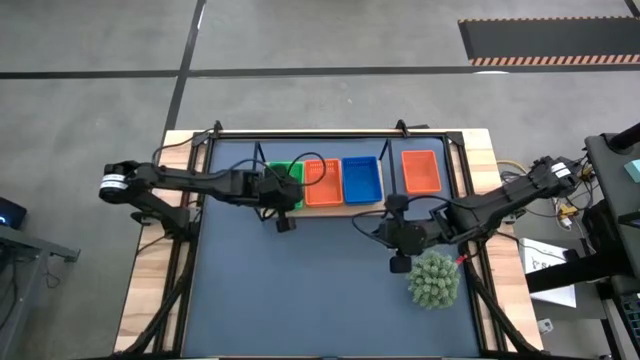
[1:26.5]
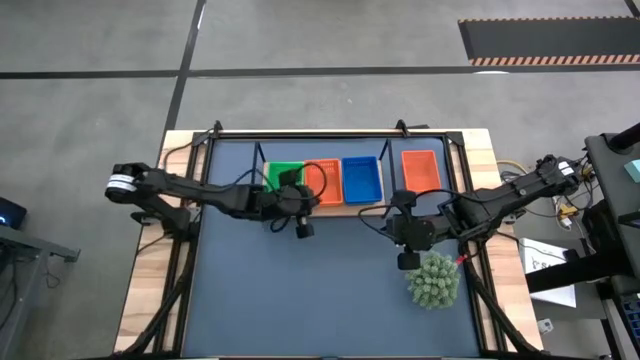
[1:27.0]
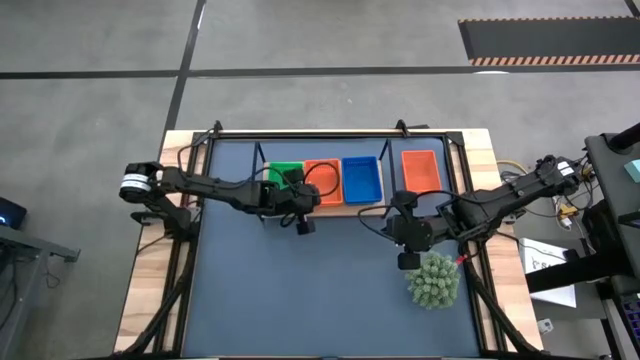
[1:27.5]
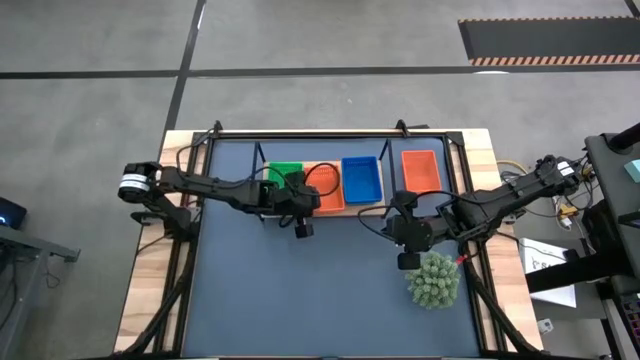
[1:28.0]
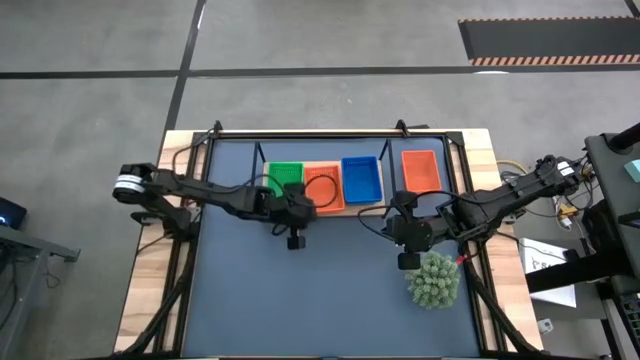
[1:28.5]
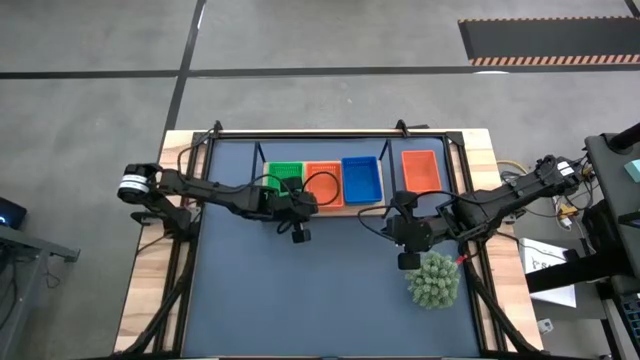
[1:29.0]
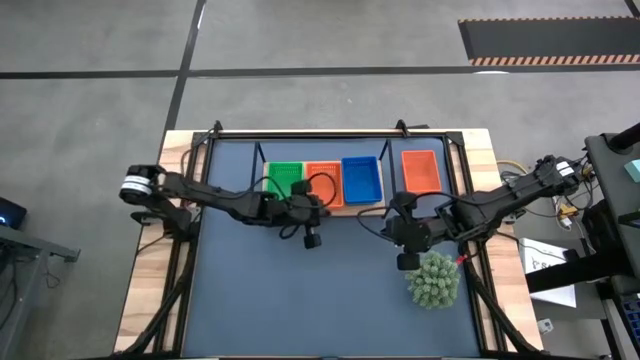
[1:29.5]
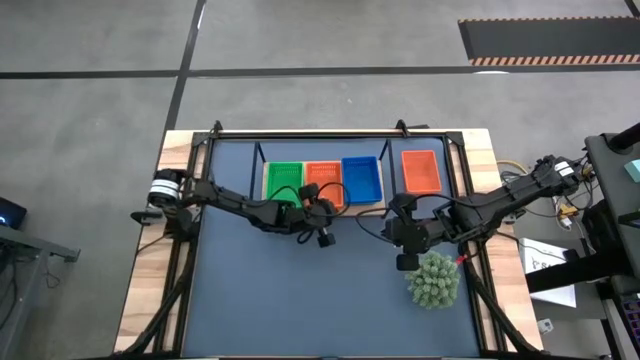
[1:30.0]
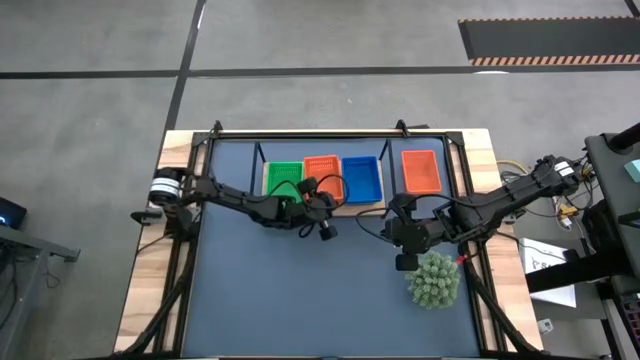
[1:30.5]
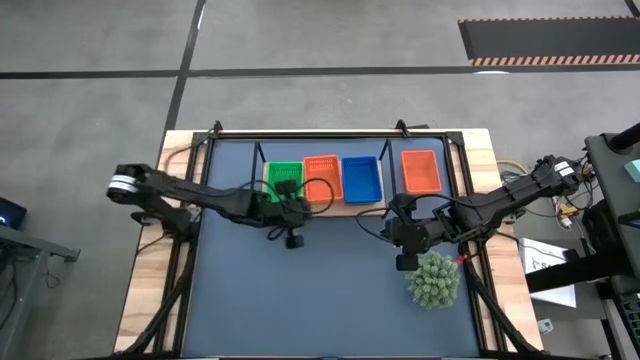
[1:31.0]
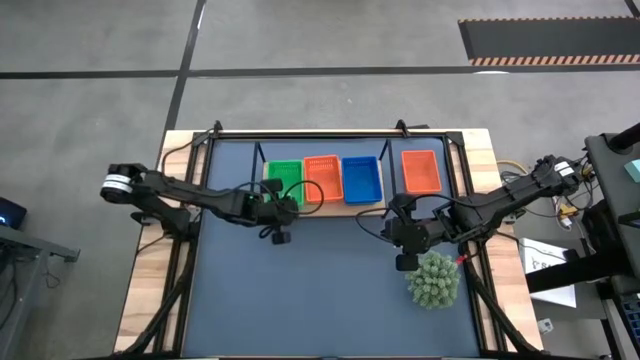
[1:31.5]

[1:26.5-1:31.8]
Task: Stack baskets on shelf by color
Adjust the basket on the shelf

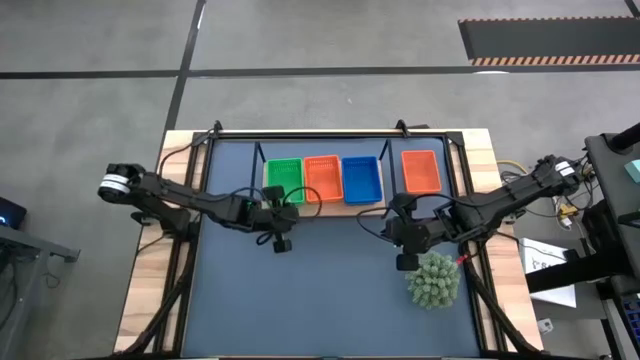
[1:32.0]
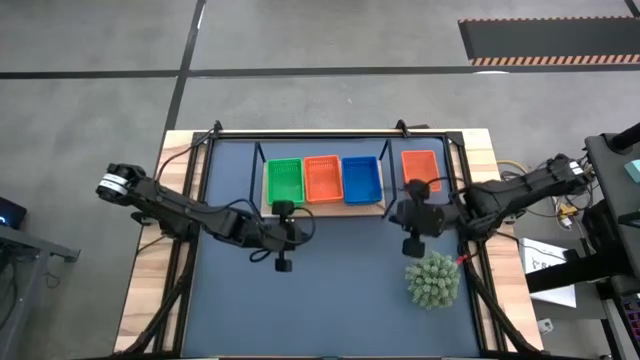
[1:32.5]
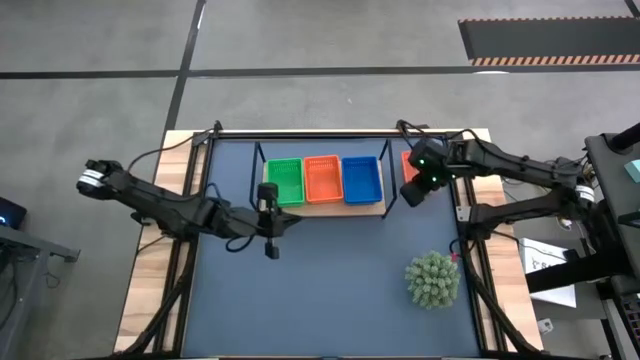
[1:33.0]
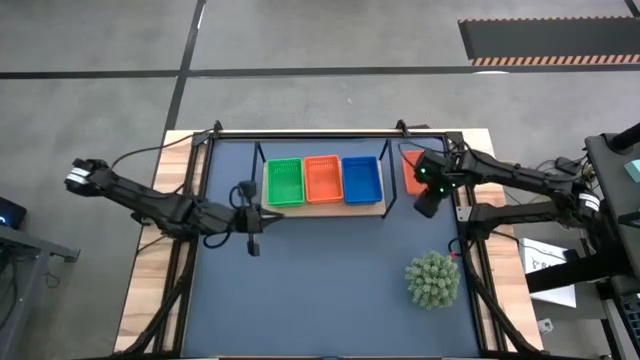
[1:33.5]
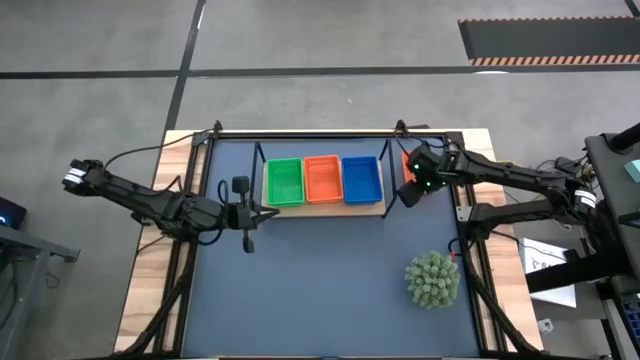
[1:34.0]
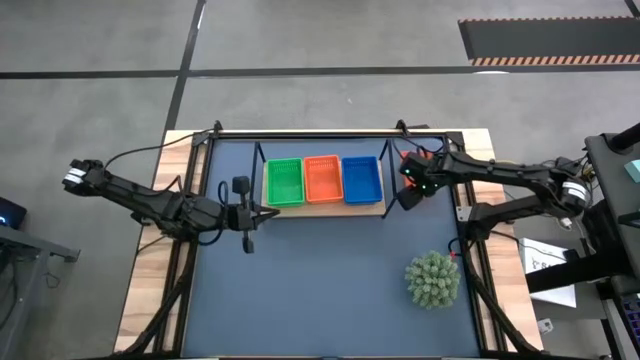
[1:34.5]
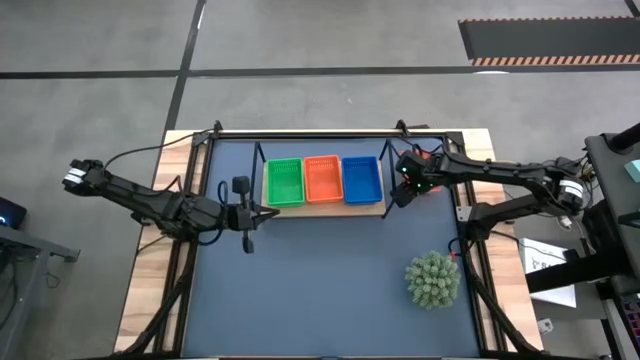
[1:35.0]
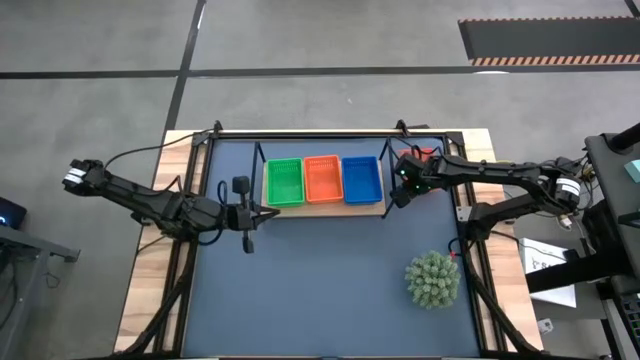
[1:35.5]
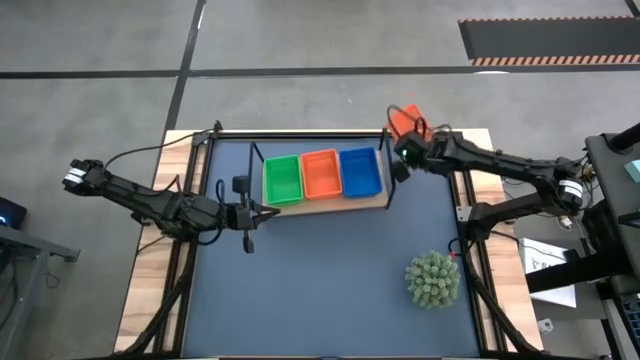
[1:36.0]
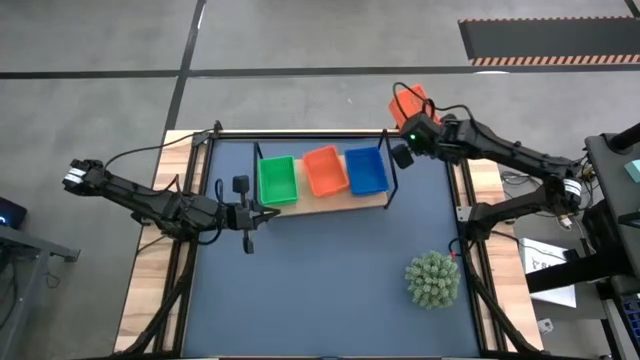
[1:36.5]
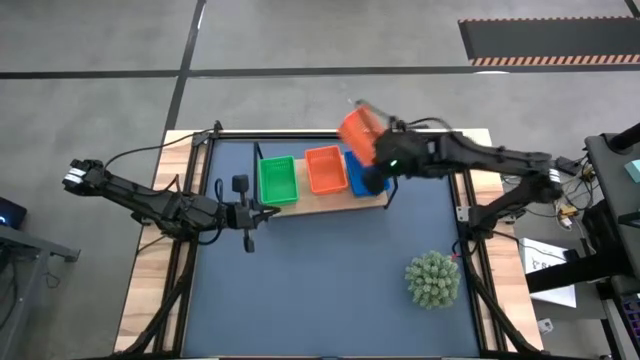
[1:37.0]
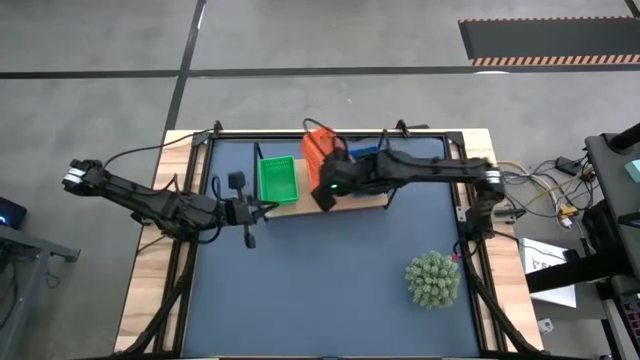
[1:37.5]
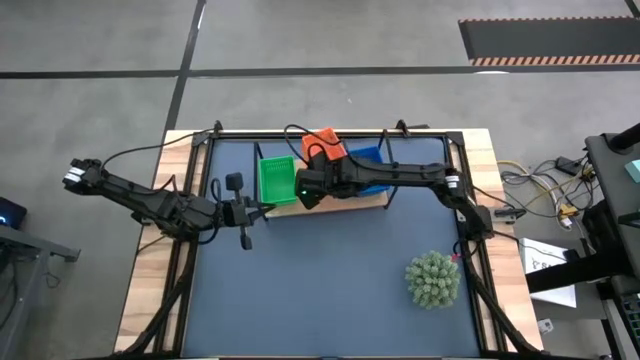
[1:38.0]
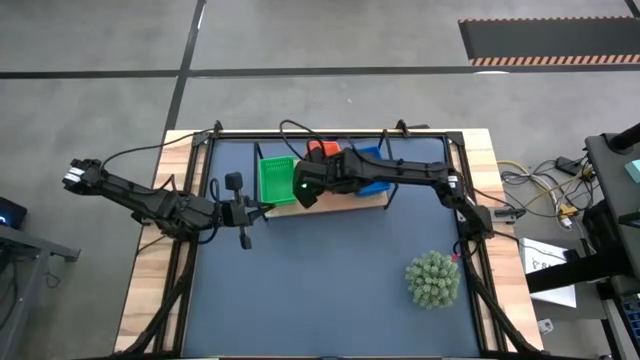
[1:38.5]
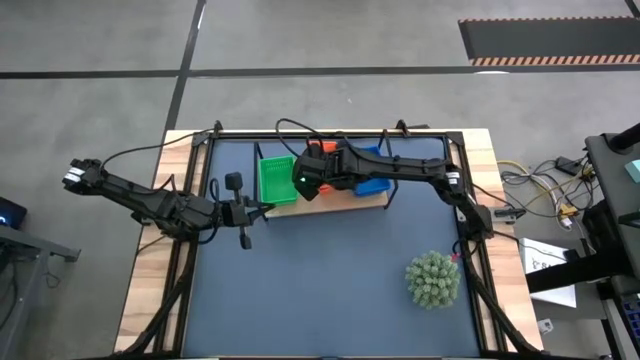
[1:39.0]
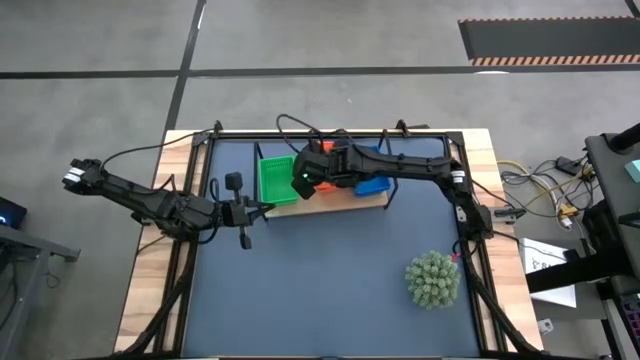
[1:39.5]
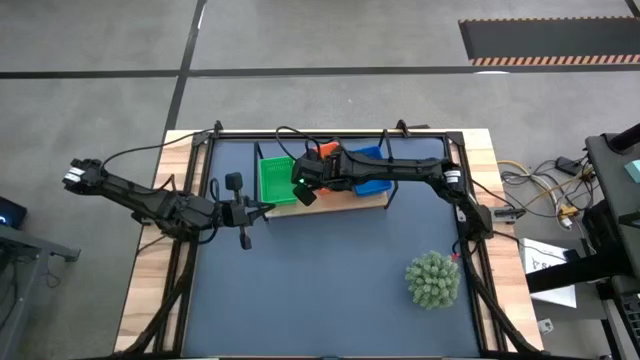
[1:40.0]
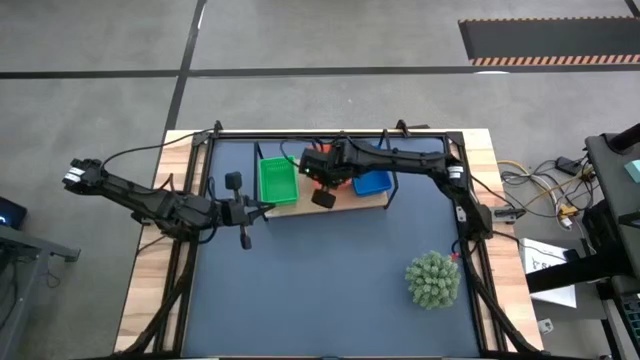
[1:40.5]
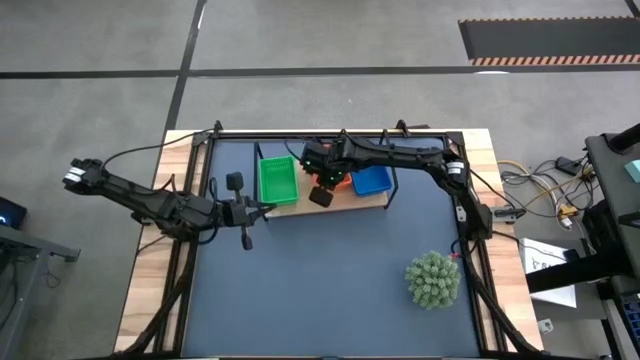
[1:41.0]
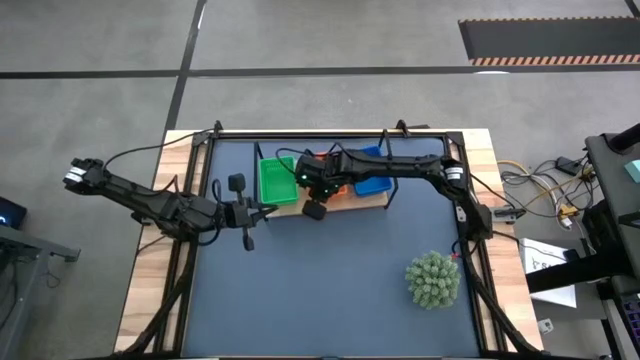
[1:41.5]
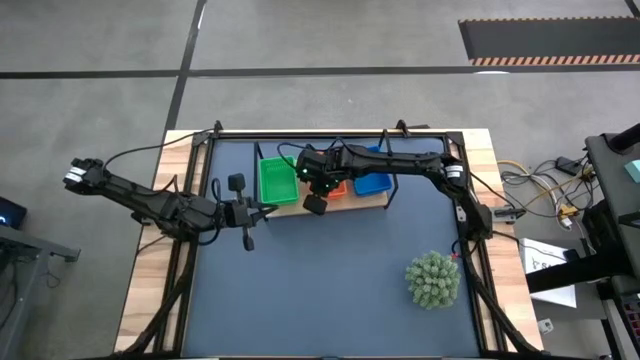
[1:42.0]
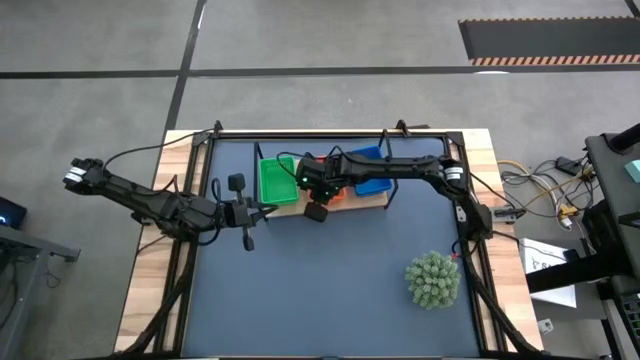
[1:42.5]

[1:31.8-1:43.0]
Stack the orange basket on top of the orange basket on the shelf

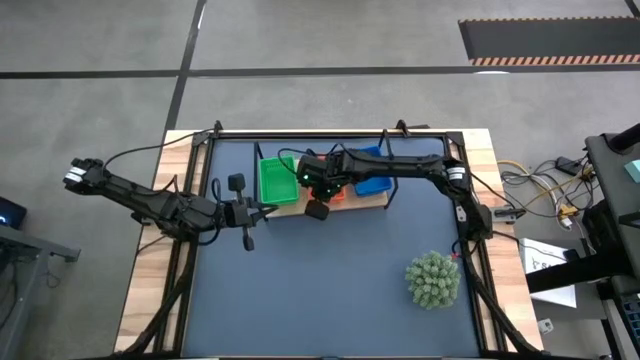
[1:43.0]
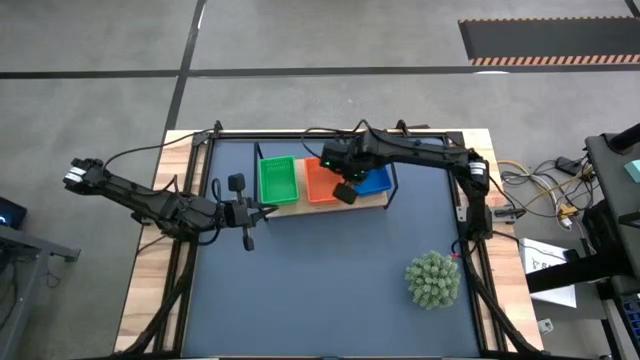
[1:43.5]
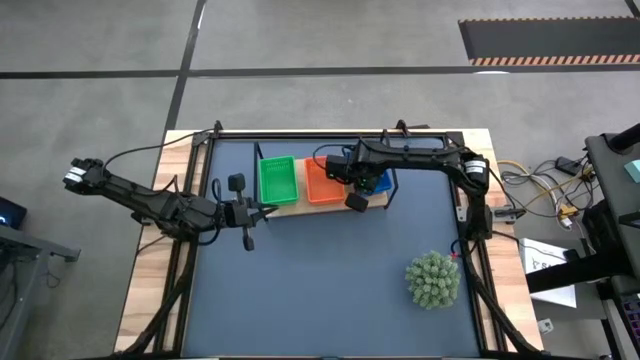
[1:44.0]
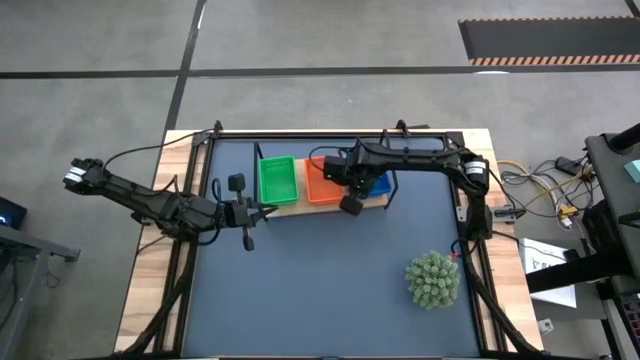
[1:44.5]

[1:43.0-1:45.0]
Adjust the stacked blue basket

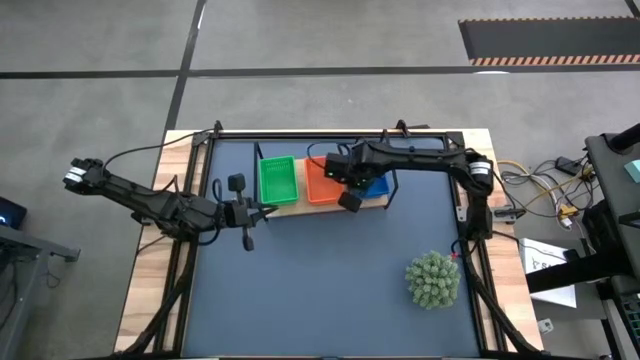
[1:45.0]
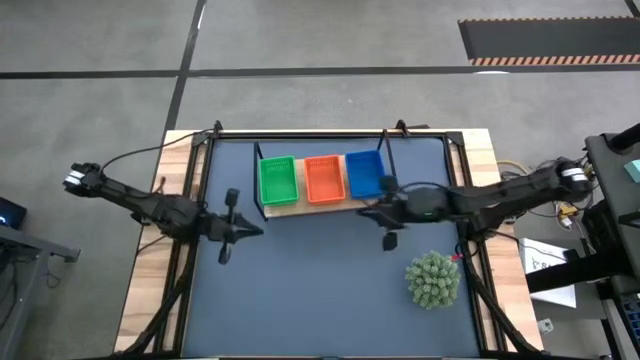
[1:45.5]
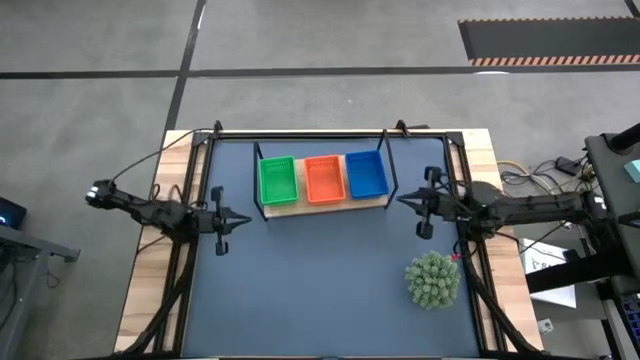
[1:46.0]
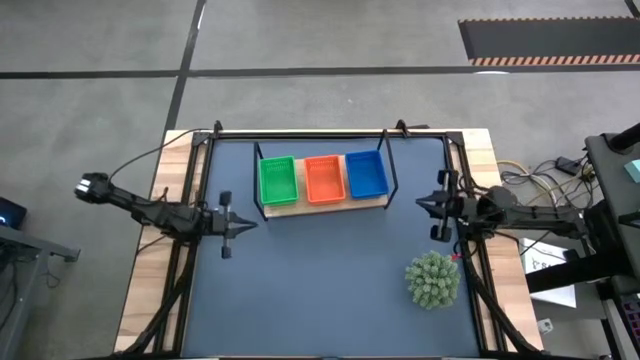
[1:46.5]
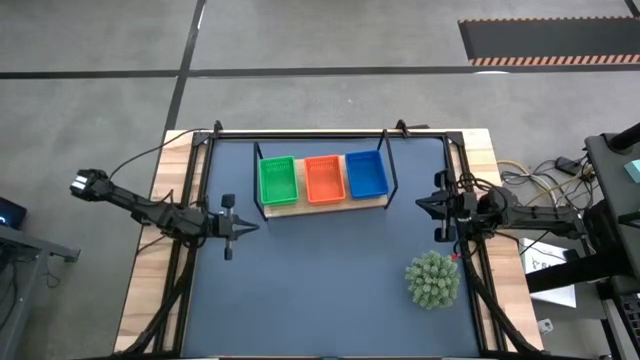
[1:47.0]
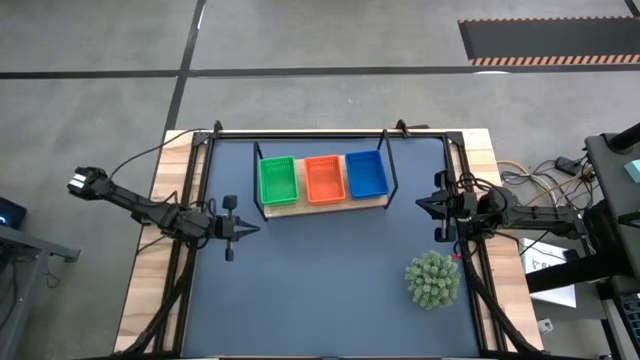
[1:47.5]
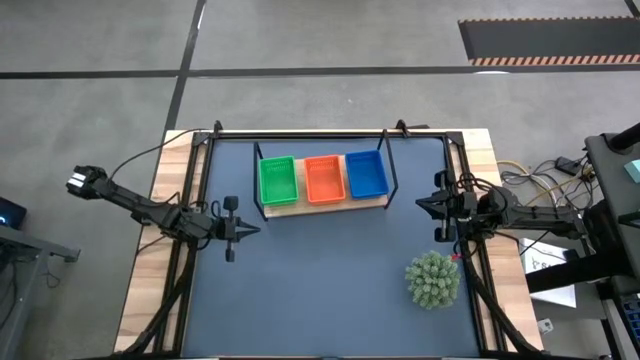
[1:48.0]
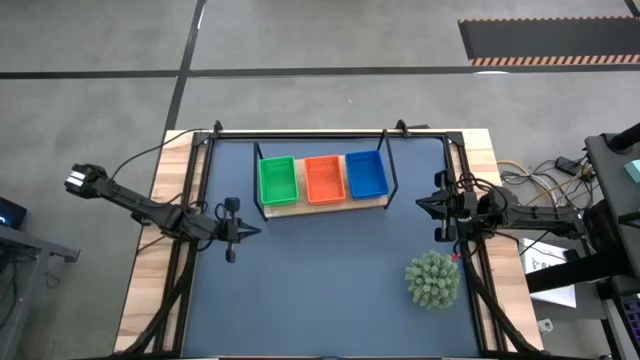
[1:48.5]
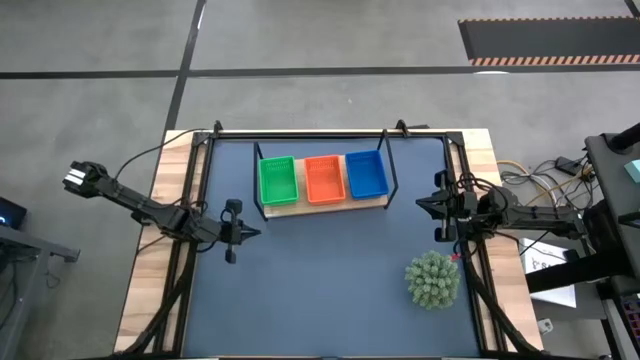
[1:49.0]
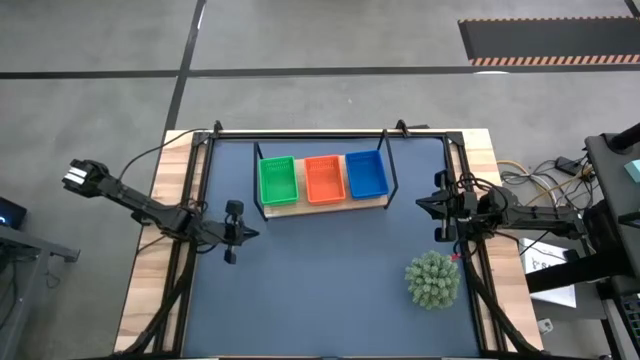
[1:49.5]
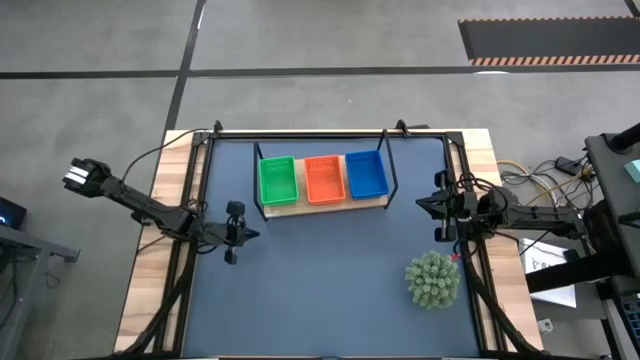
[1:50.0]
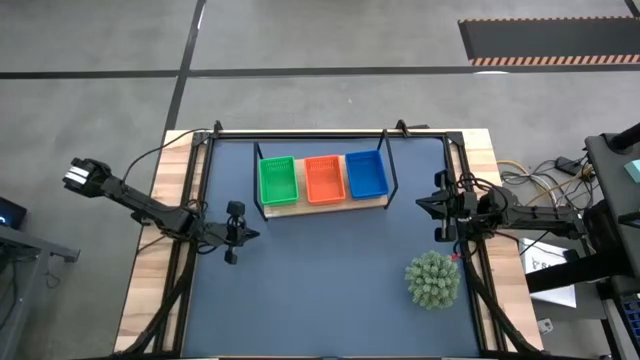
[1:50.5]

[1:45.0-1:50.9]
Return to home position
